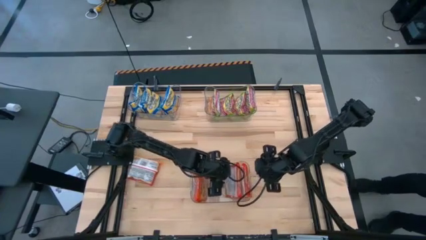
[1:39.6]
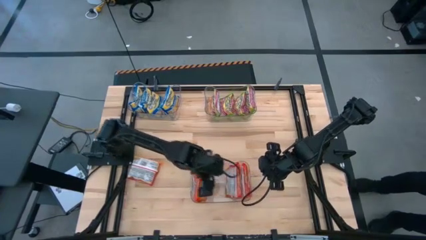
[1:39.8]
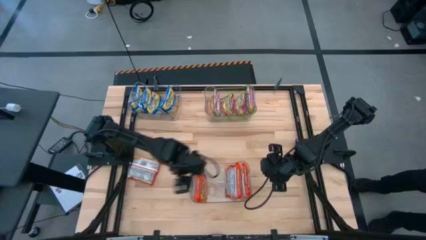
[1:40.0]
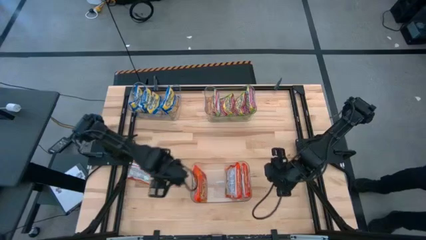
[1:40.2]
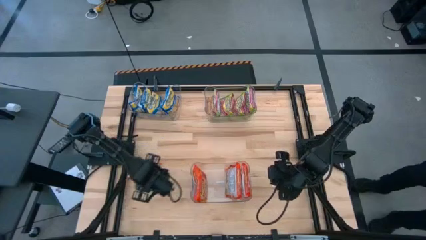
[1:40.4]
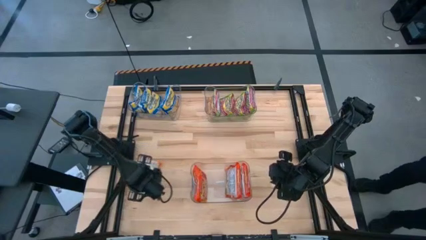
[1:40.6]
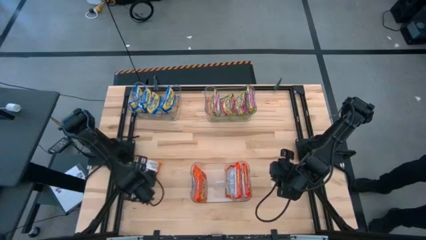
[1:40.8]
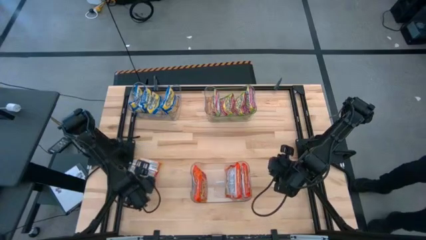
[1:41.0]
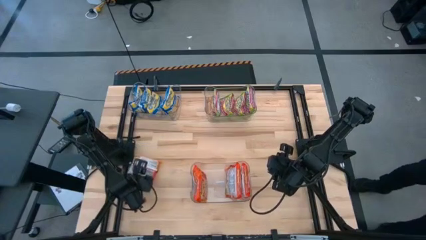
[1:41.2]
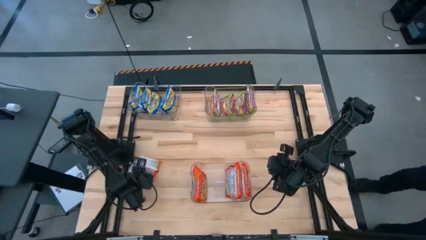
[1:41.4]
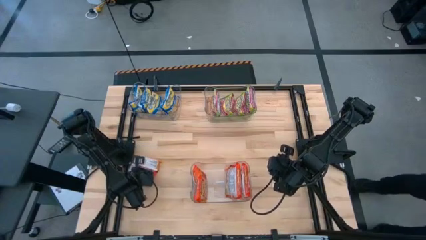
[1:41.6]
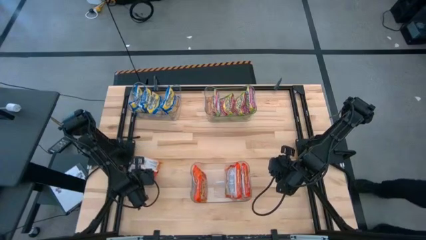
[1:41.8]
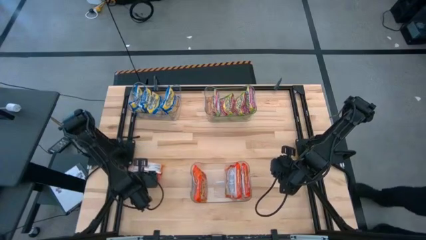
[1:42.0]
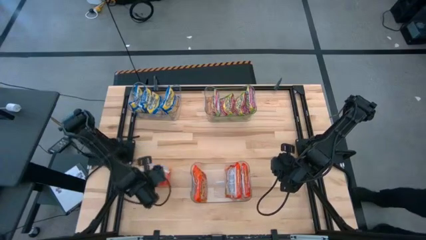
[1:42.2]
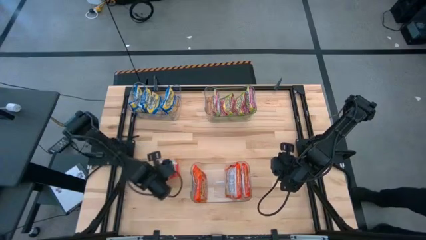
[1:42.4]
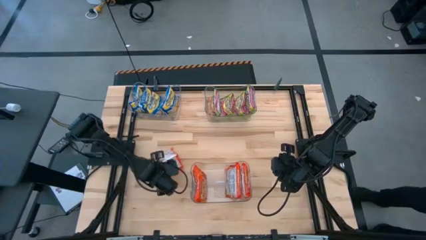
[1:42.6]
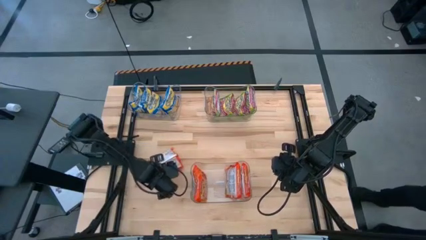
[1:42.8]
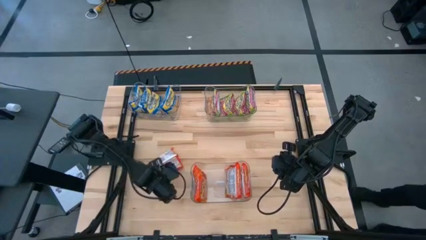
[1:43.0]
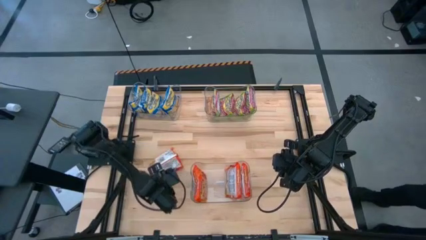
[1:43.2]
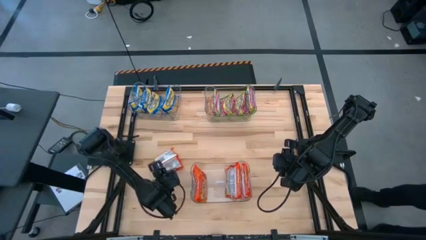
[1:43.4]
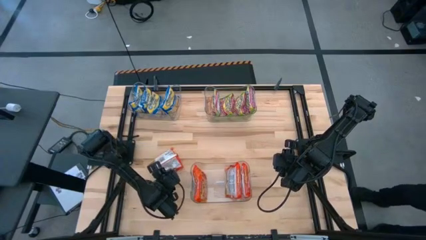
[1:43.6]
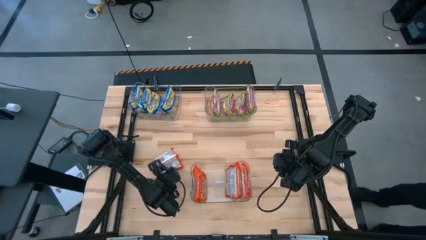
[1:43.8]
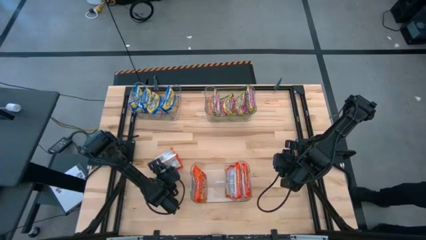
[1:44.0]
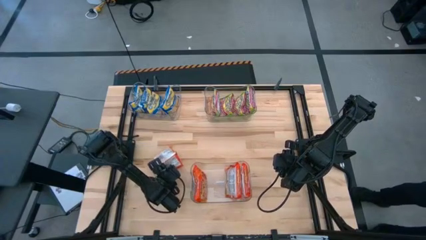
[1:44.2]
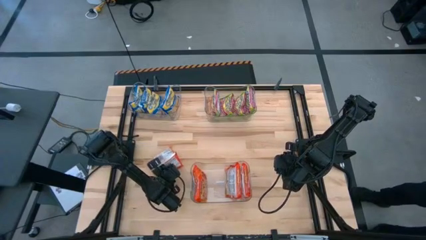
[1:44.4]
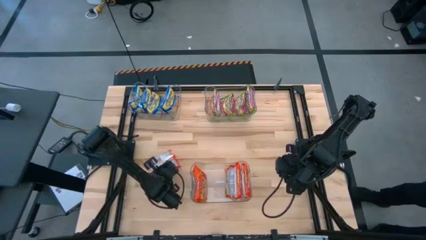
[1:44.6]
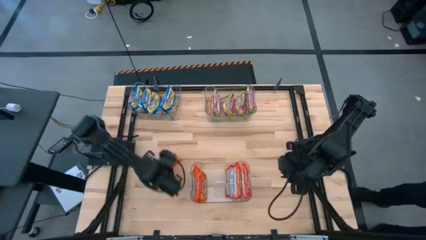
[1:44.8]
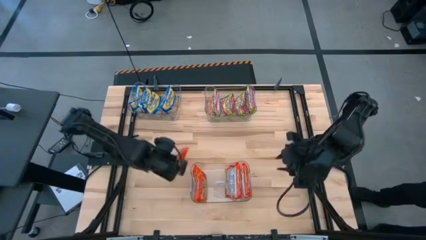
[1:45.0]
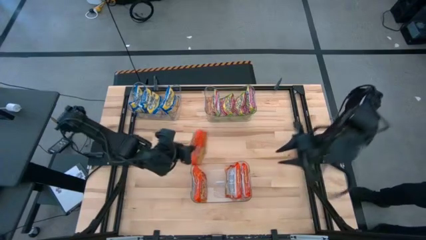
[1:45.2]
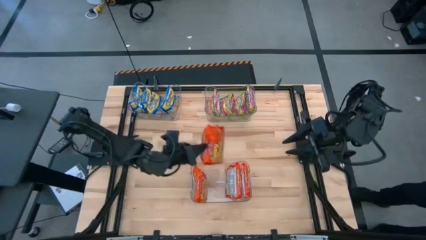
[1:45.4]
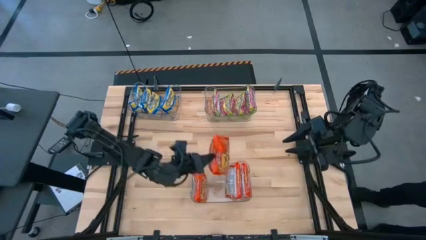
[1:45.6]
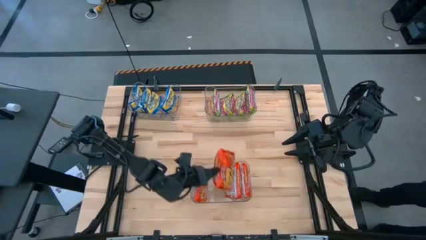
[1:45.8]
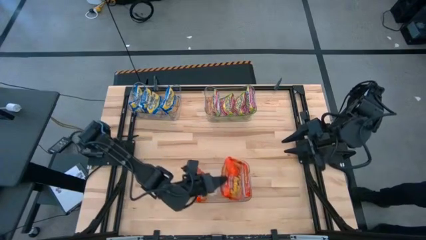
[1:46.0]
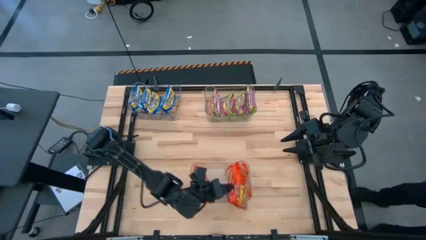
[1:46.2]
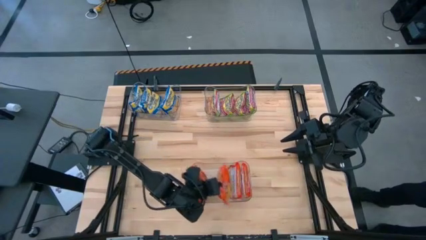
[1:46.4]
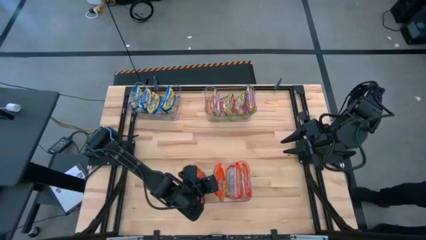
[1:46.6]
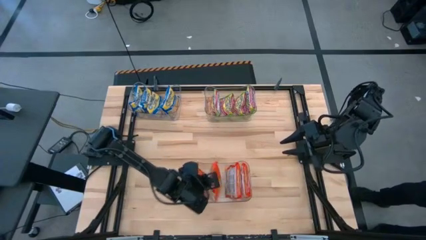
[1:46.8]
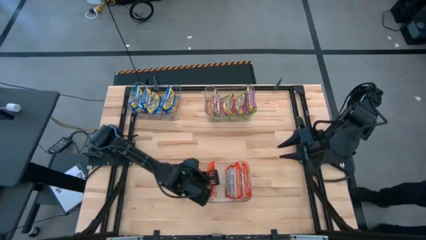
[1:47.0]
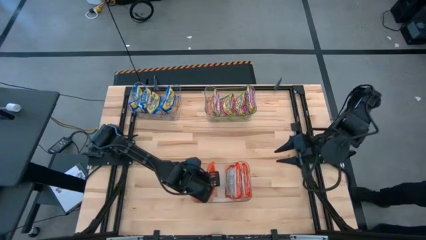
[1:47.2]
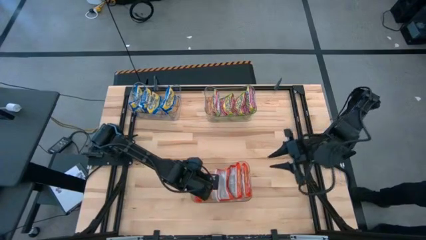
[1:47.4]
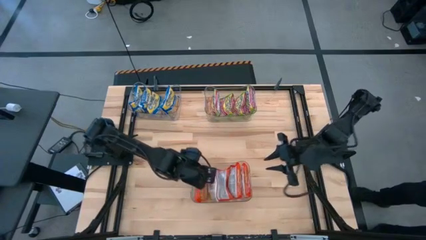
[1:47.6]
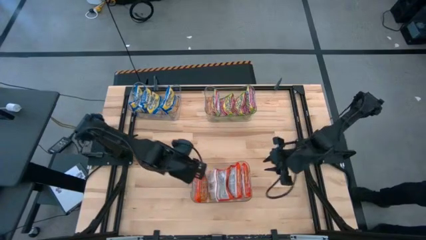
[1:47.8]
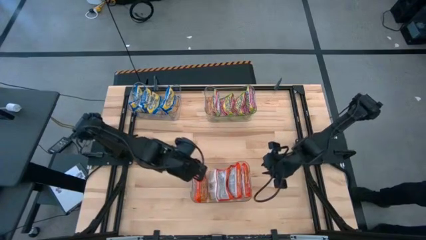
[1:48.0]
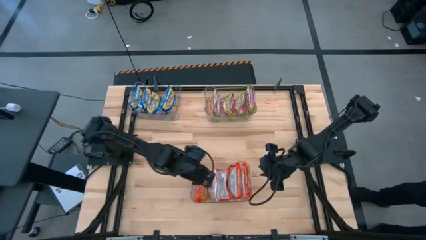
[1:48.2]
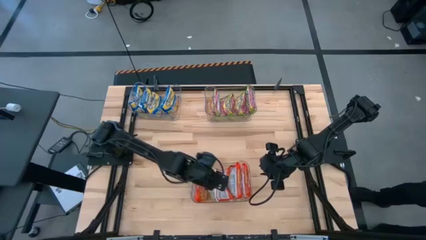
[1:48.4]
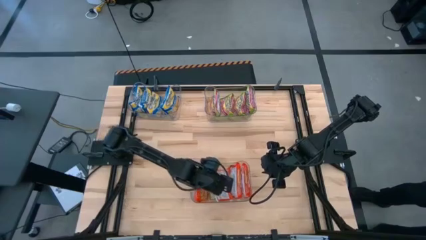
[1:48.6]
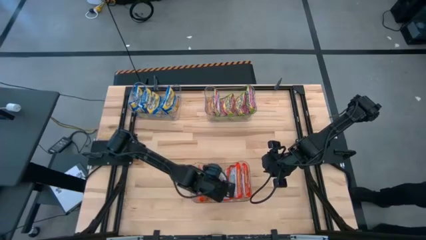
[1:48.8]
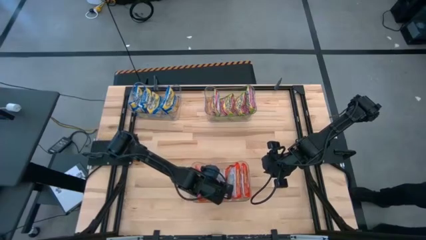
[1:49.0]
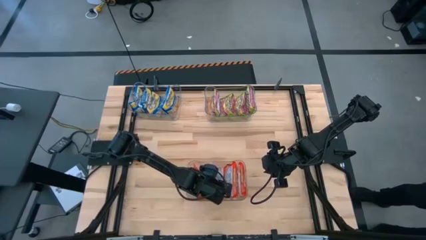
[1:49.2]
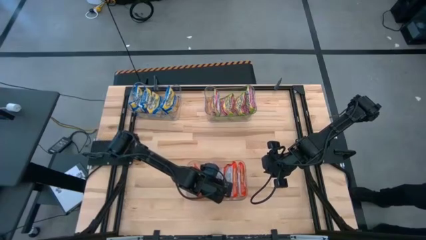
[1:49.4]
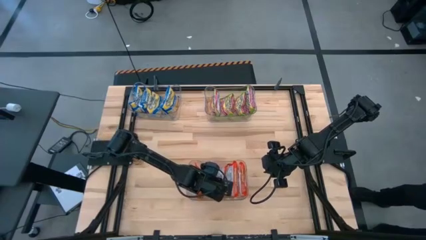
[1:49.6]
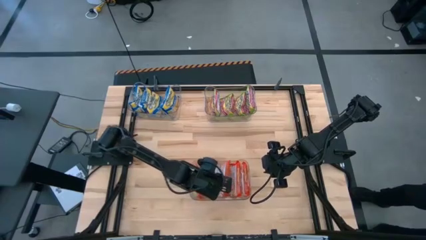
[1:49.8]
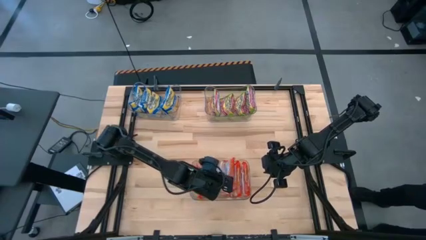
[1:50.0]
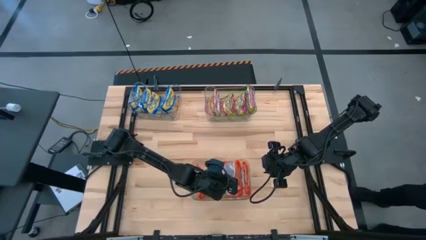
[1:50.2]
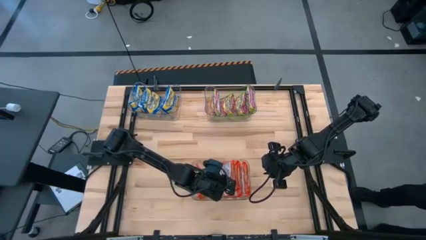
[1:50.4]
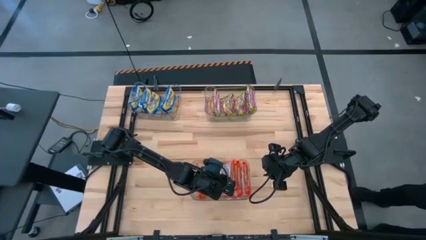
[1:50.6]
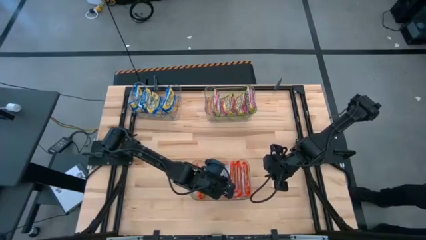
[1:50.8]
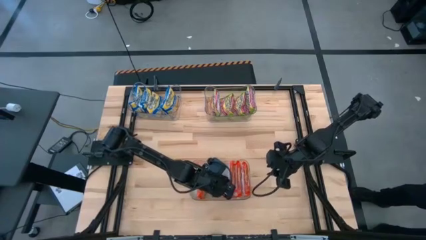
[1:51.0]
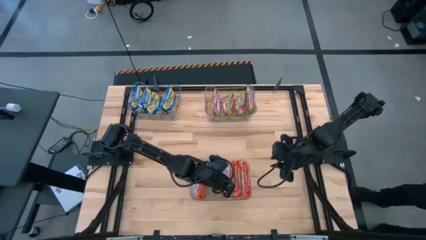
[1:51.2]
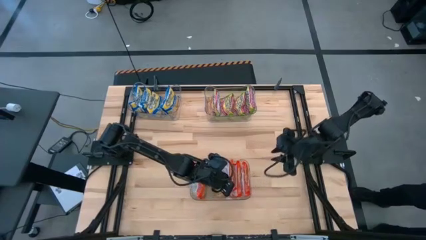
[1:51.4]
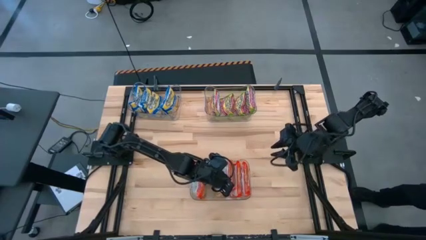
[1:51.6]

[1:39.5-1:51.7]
Task: Sort Maruchan noodles
Put the orange noodle pack into the bottom transparent bin

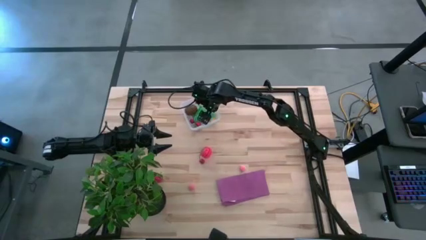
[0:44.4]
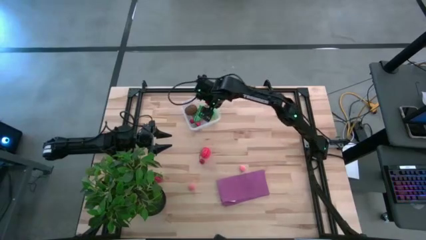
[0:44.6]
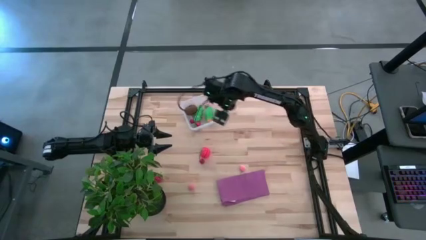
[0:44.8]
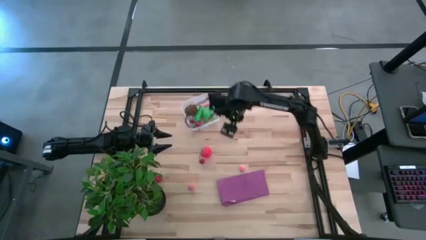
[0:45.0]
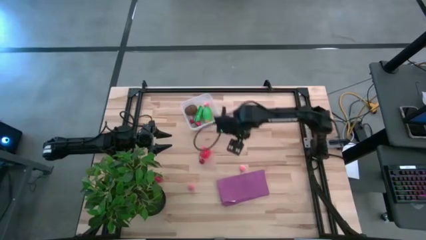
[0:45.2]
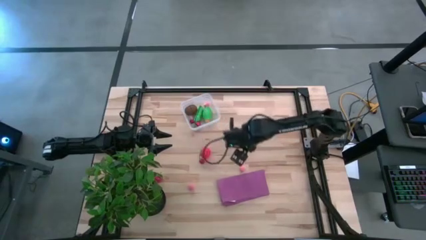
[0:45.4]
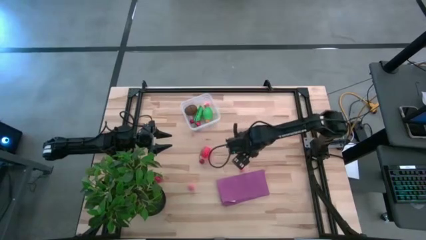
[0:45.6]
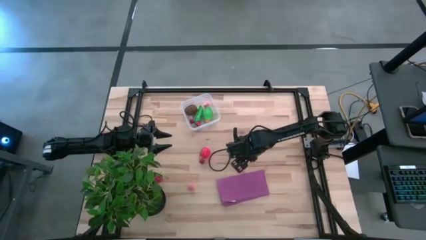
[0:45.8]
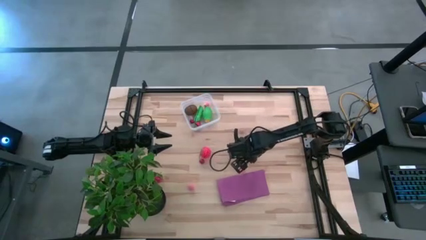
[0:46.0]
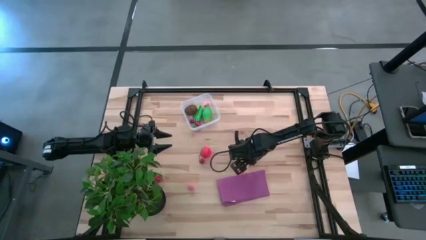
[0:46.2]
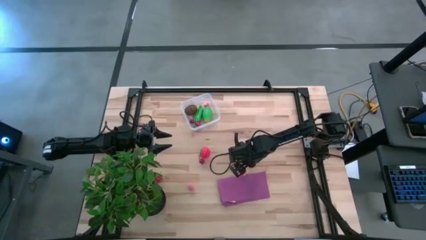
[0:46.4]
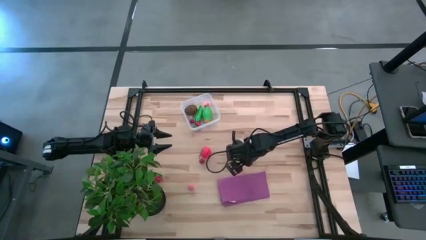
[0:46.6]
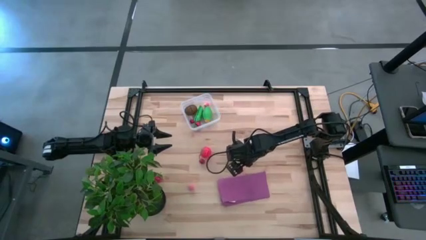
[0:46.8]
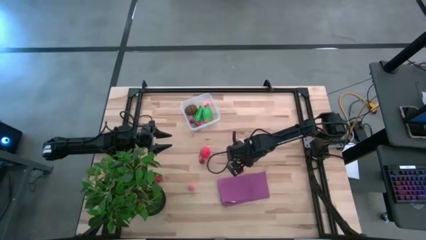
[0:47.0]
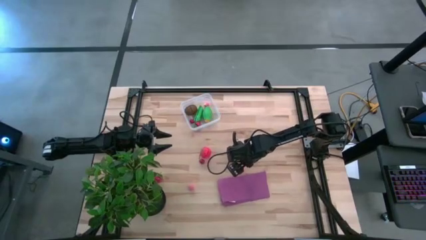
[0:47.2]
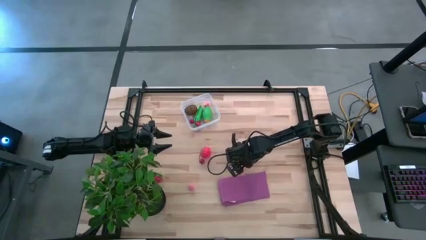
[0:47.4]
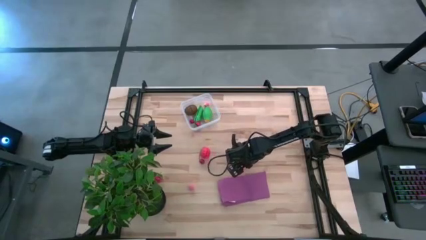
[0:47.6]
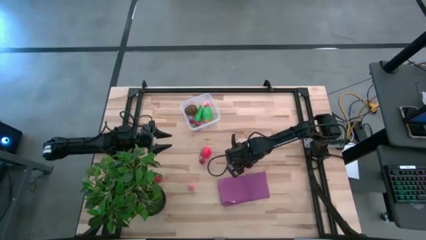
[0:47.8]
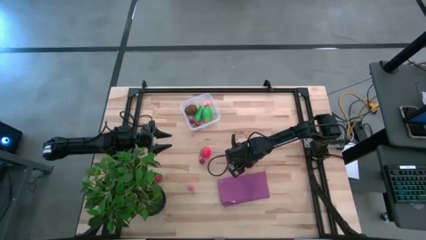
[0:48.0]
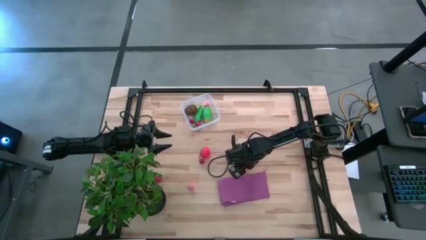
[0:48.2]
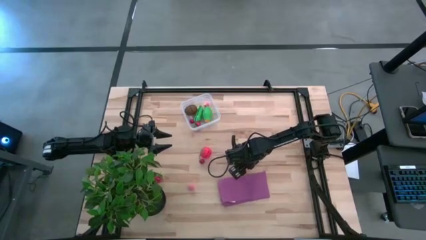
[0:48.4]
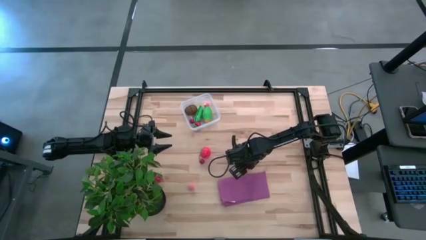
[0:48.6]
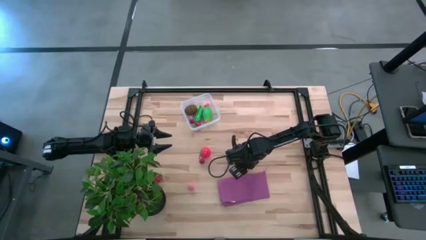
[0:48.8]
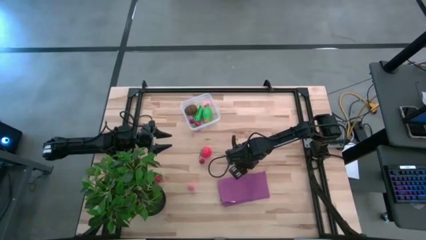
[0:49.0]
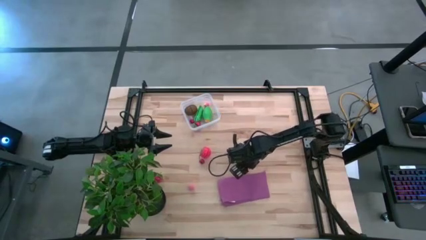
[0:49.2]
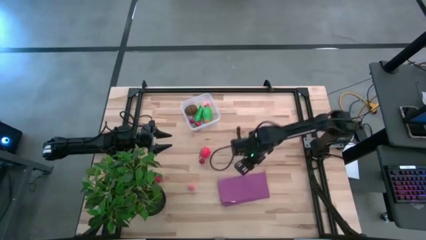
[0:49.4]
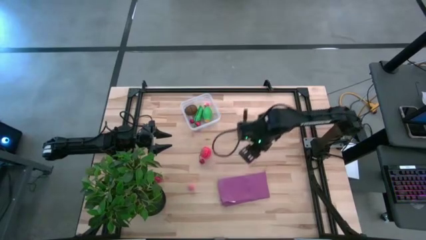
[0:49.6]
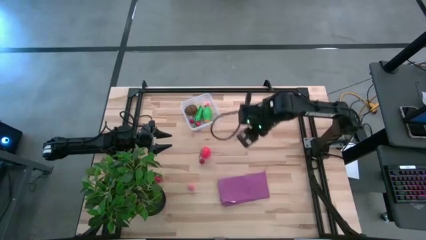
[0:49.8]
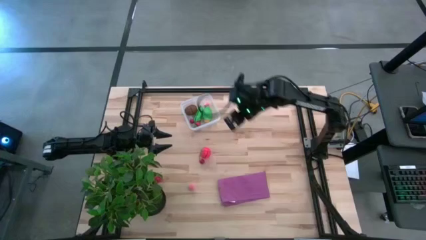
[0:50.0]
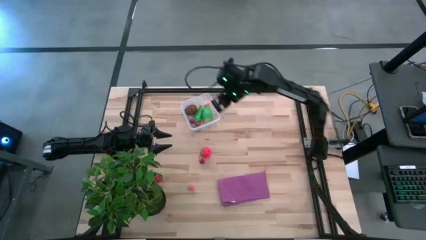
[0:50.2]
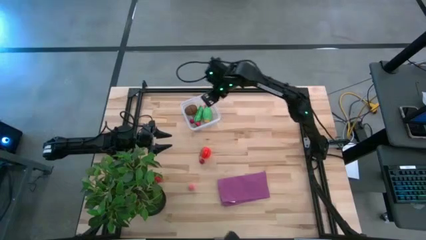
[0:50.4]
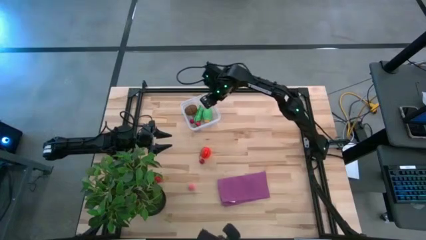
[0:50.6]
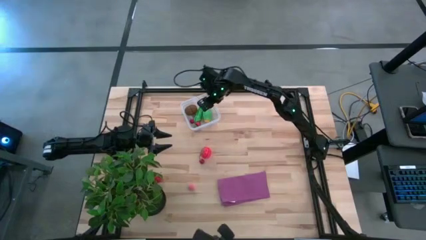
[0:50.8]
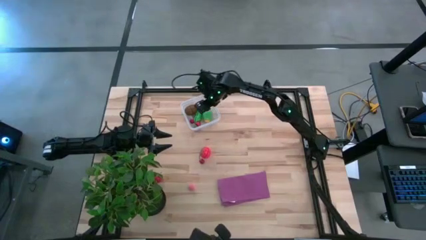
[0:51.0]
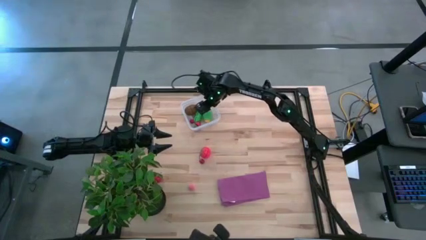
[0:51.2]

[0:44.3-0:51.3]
Task: Pick and placing Produce into tupperware
Put the top pink peach into the transparent bin
